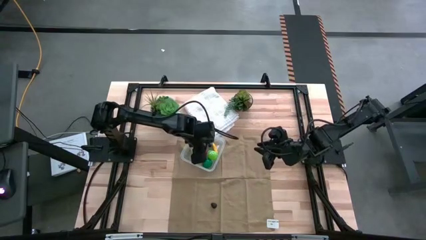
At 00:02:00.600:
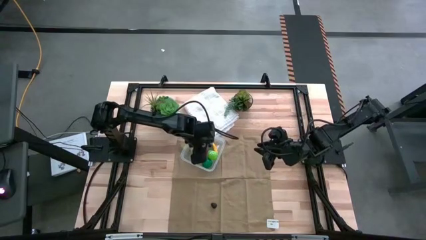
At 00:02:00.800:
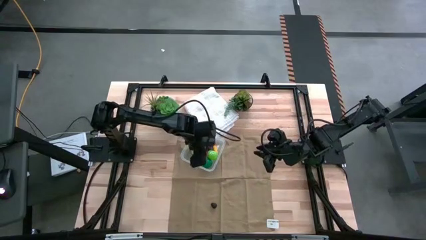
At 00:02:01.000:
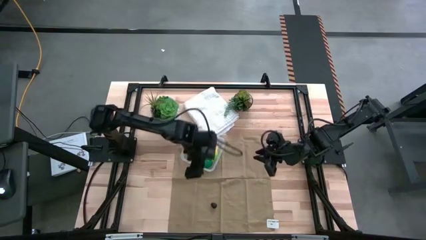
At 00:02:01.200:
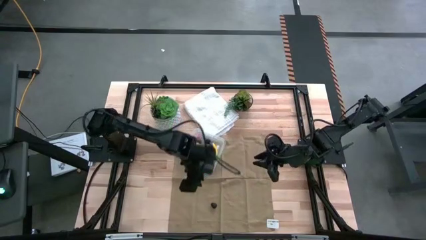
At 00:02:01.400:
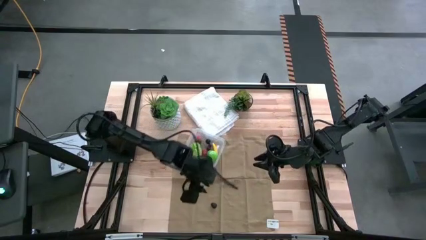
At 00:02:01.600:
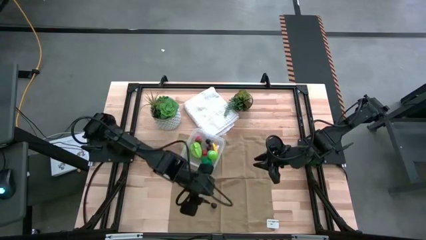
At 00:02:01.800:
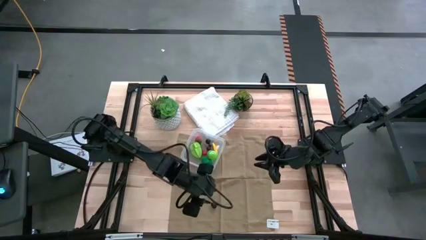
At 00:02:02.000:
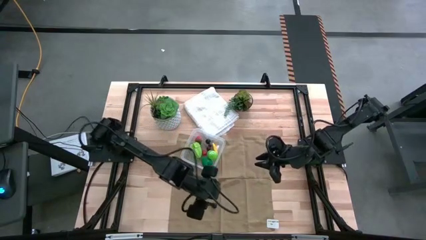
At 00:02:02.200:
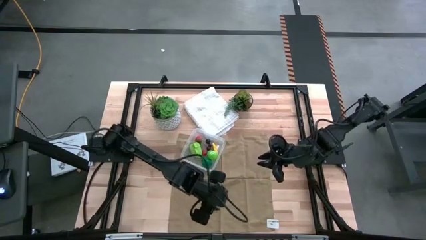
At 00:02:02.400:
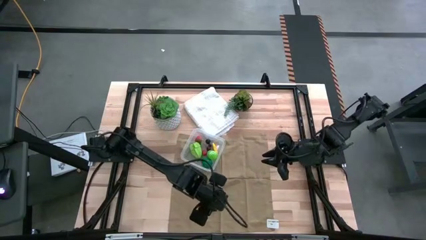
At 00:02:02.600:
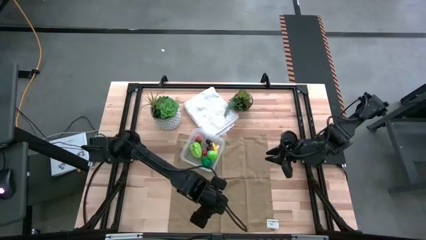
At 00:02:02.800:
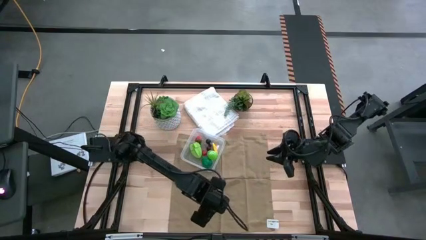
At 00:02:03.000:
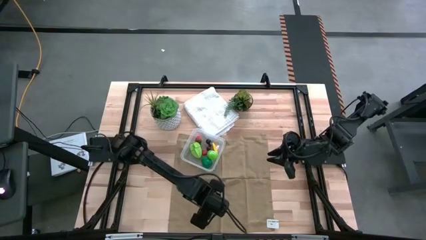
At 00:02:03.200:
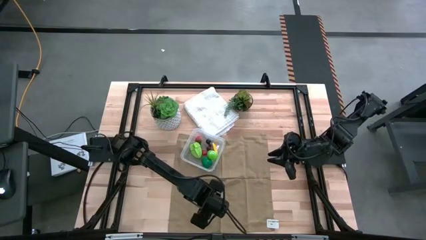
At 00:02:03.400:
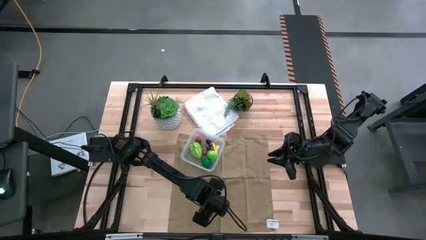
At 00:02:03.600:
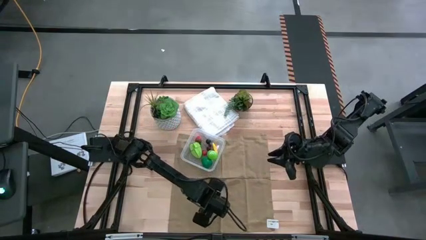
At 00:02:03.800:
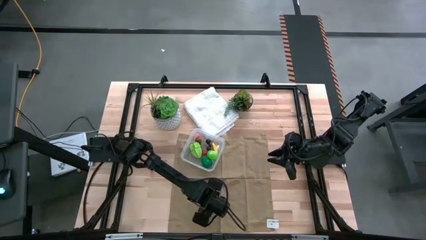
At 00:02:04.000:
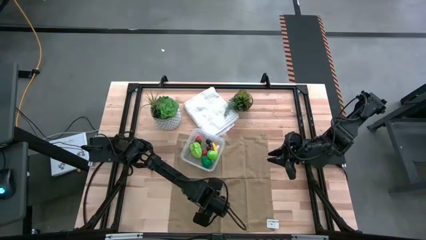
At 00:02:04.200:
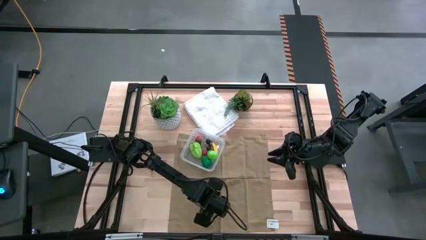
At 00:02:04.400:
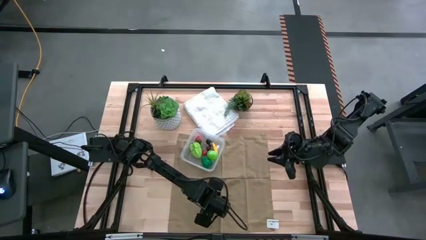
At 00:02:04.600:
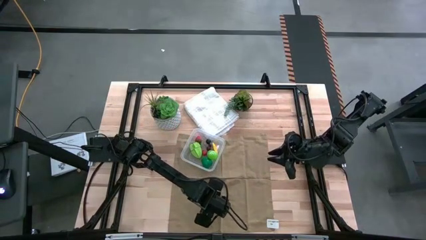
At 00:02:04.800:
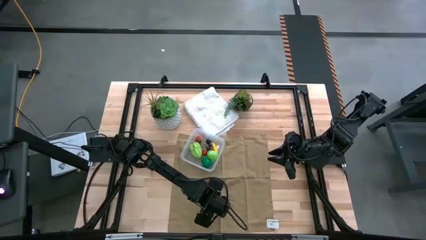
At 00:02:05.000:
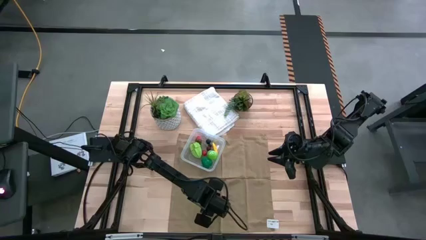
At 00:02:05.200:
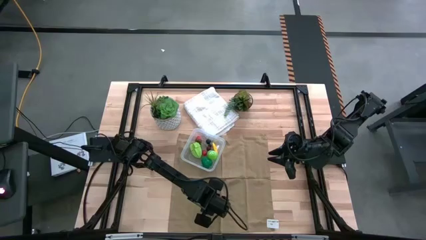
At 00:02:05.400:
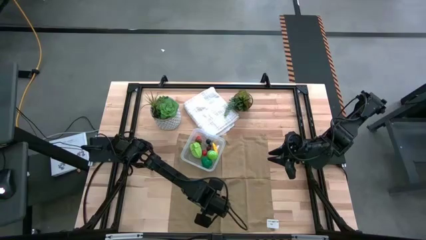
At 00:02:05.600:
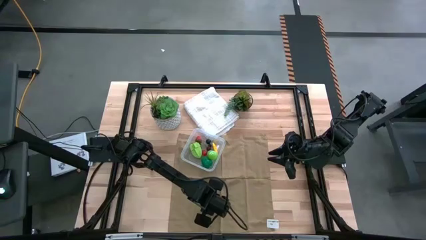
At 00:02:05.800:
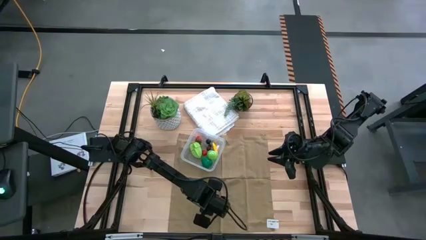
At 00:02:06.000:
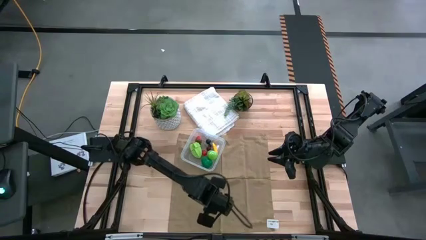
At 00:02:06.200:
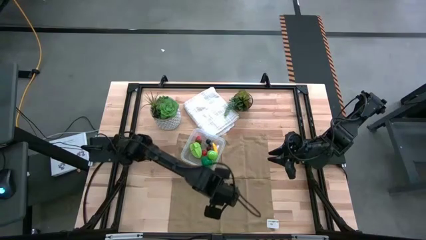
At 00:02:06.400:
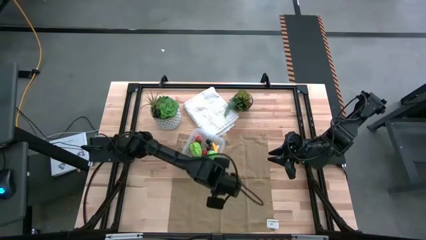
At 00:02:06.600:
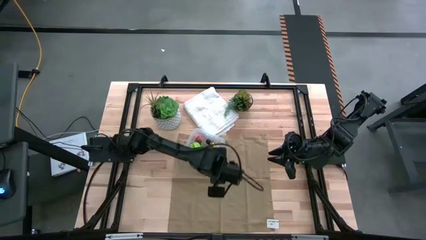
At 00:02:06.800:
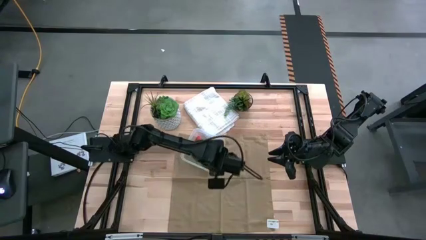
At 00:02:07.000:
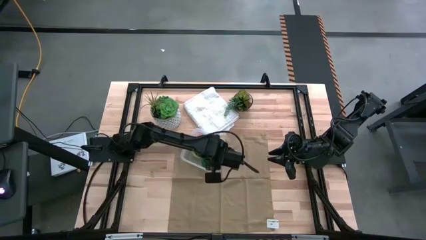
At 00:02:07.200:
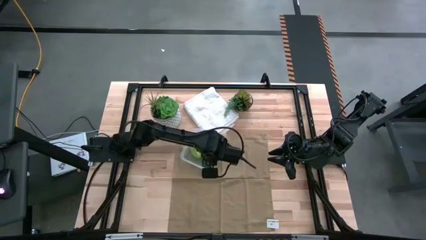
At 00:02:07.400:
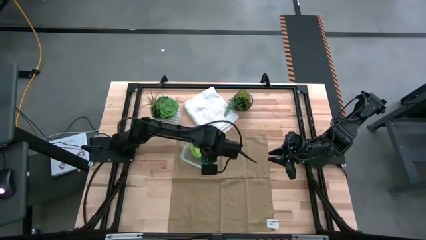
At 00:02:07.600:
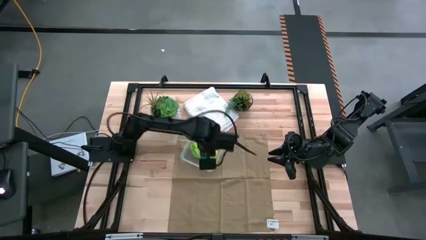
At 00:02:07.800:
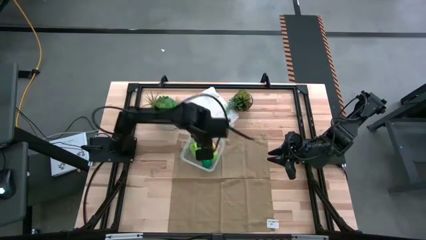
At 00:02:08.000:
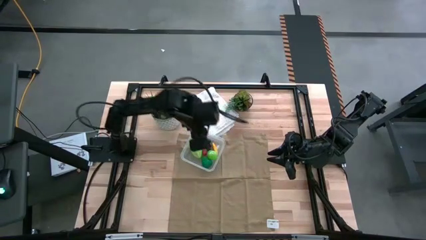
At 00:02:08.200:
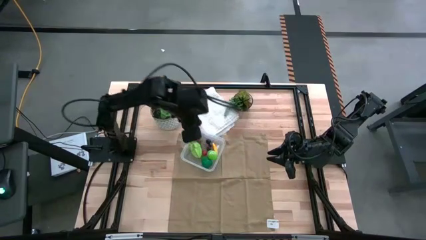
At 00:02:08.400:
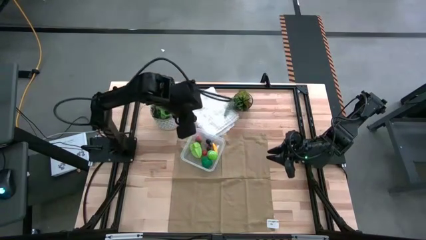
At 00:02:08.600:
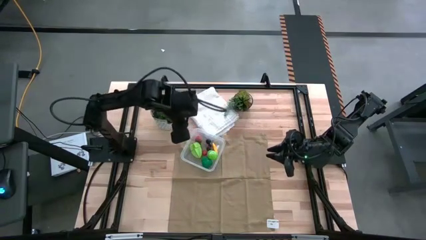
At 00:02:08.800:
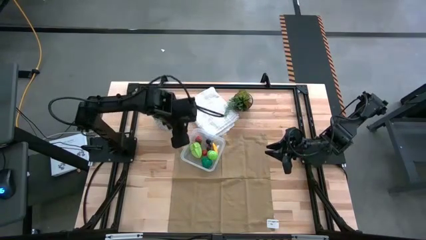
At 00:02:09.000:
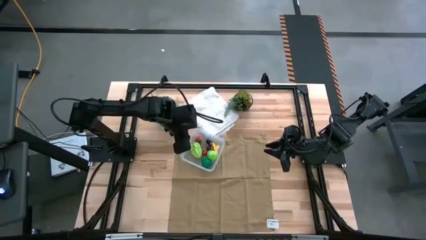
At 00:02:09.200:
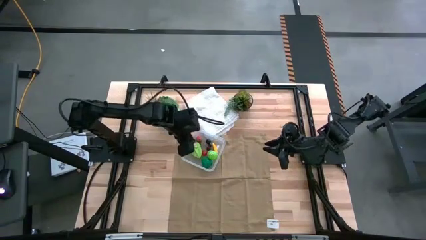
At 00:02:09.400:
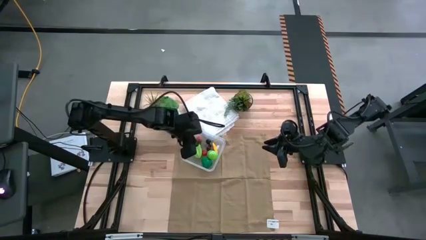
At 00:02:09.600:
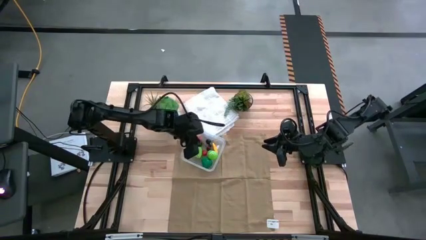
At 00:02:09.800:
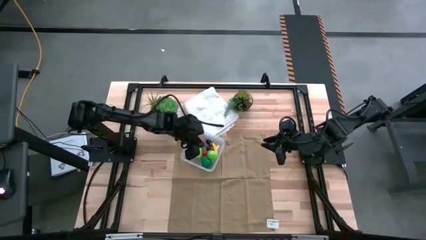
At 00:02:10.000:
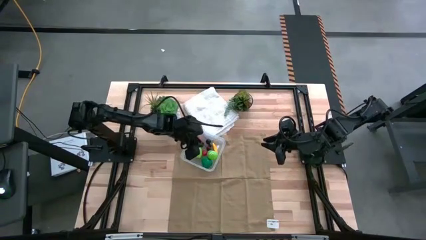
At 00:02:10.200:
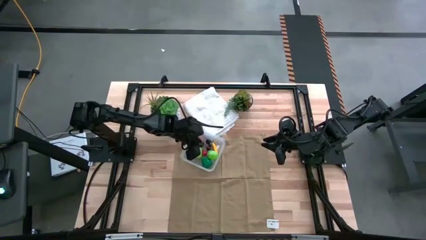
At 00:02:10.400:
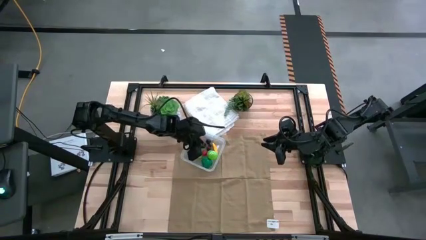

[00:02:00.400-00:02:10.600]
Task: Pick and placing Produce into tupperware
Put the blackberry into transparent bin

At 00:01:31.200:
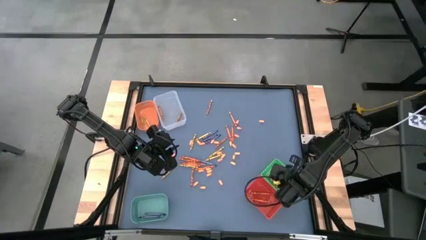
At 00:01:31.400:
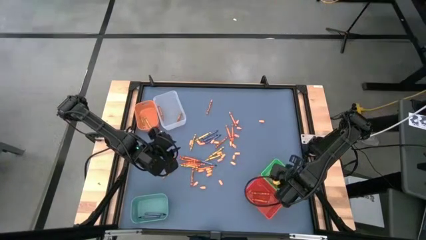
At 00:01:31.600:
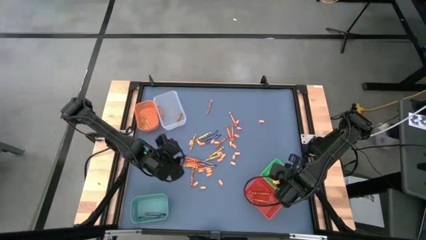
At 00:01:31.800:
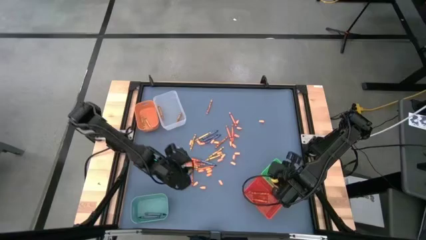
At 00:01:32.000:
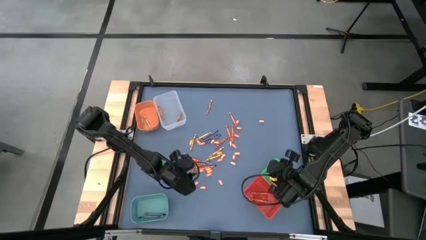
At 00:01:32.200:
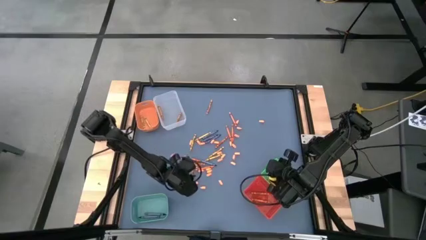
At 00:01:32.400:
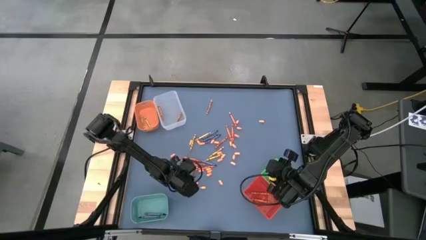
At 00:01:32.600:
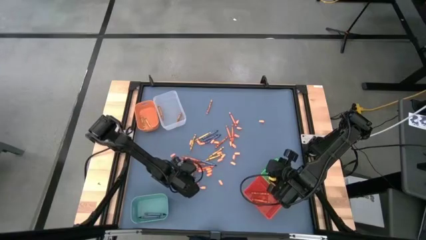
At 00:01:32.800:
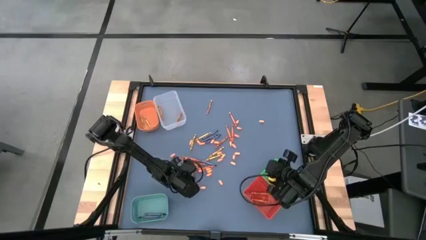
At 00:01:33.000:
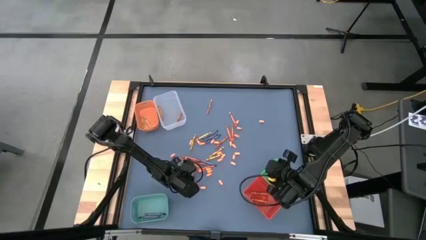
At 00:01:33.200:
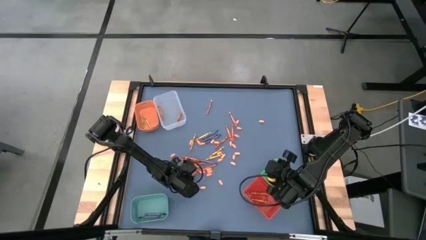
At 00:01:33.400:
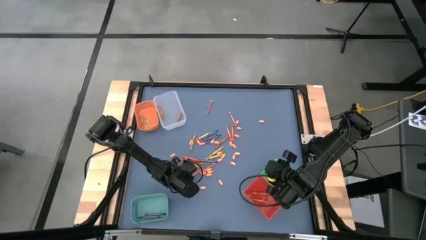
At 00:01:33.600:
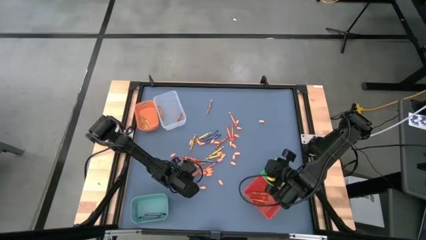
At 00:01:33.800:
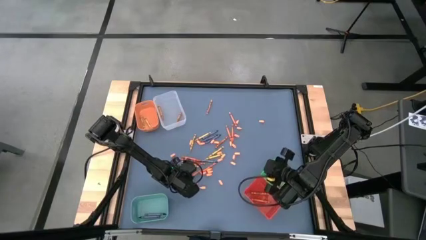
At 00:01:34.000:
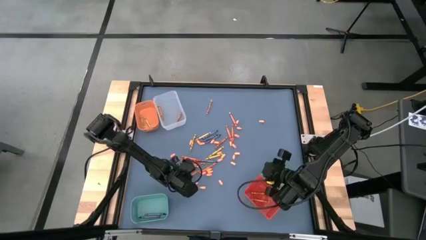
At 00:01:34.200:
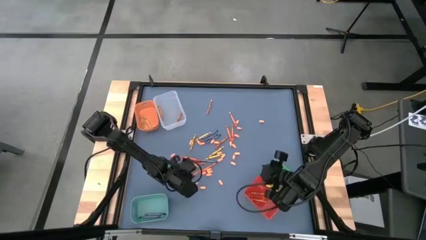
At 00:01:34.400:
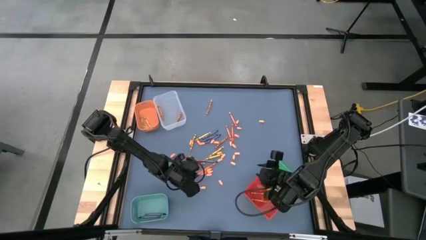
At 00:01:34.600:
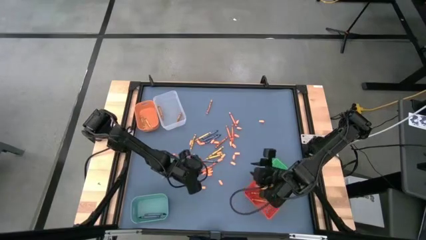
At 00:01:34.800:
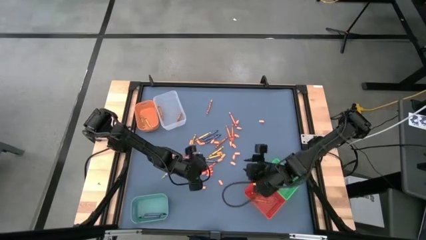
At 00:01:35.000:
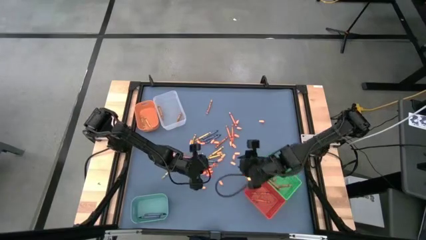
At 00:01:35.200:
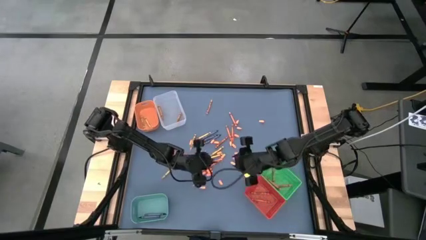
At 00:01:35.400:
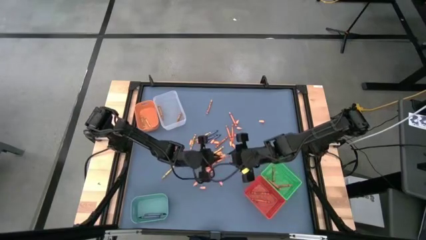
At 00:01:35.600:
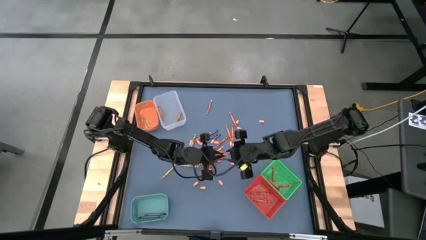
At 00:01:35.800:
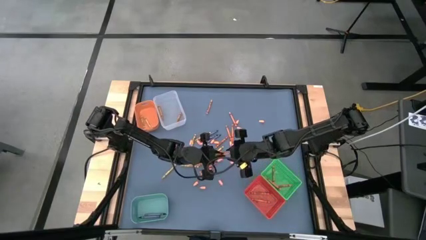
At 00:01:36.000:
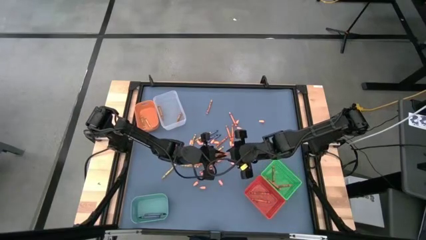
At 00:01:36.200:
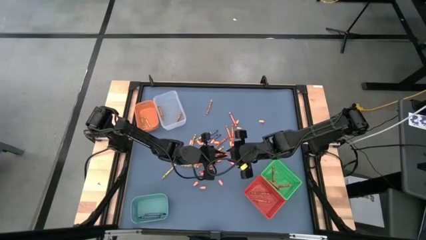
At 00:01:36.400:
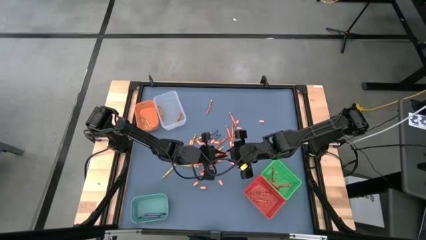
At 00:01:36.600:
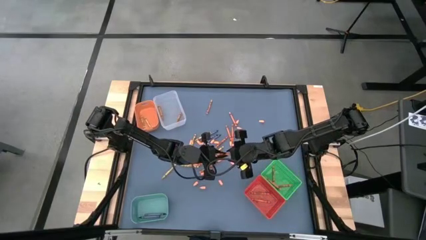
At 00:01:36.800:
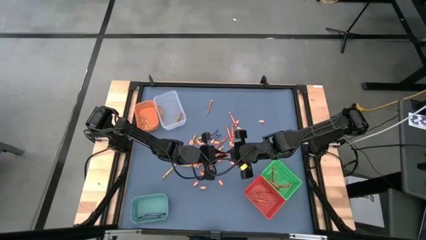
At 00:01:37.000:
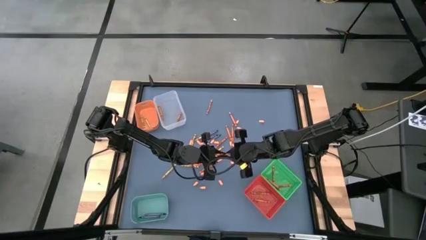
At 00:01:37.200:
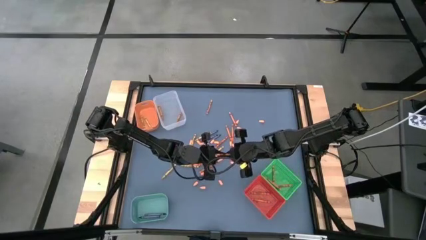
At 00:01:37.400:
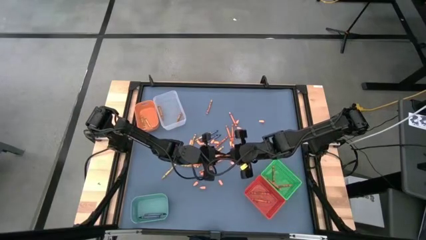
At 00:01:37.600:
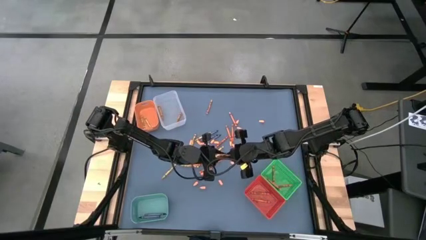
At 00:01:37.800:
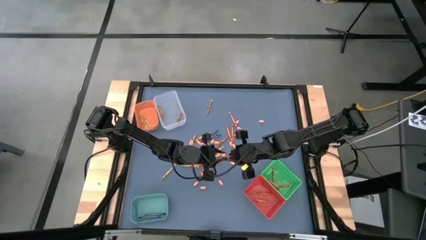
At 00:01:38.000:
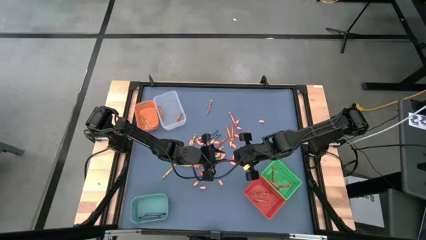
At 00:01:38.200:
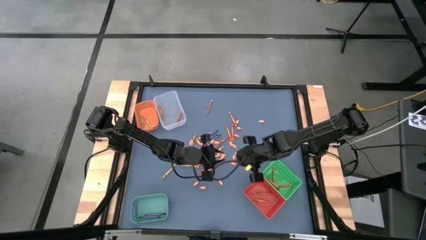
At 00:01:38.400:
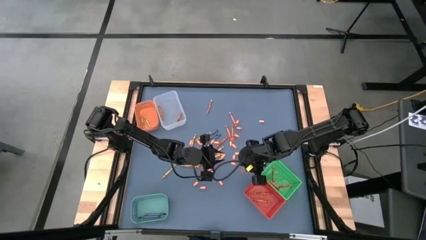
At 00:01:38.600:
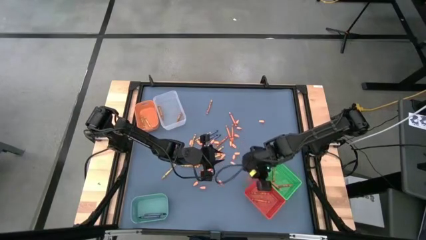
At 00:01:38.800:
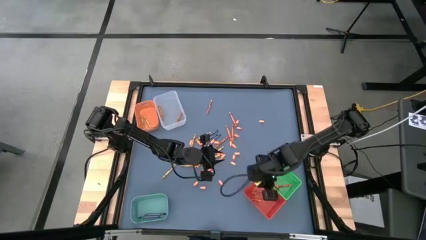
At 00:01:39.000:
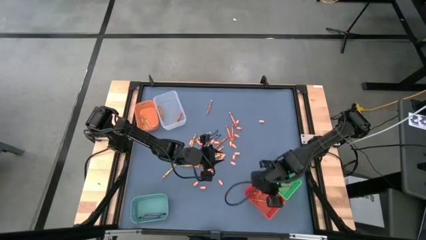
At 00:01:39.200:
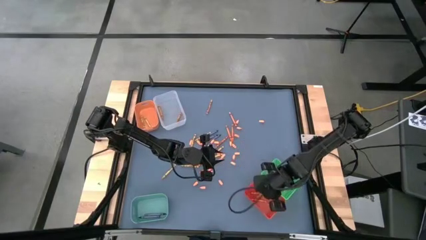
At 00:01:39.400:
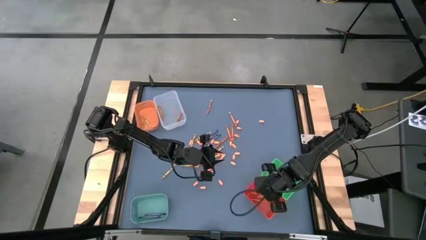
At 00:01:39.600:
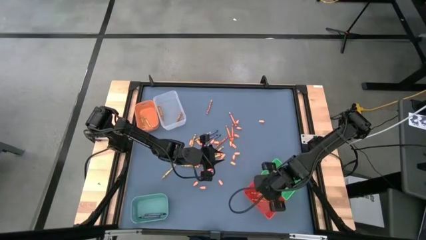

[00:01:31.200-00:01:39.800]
Task: Sort crayons
Put the red crayon into the red bin
